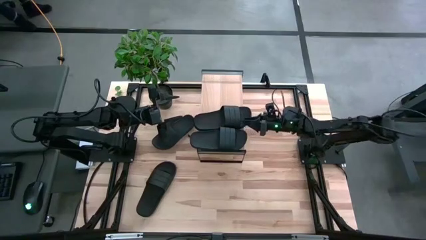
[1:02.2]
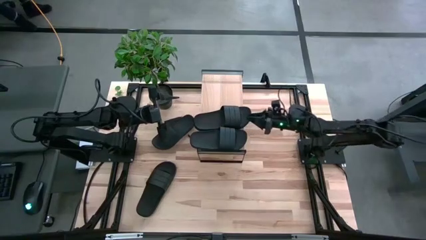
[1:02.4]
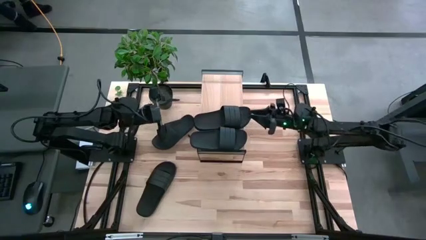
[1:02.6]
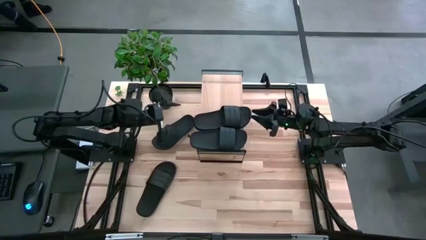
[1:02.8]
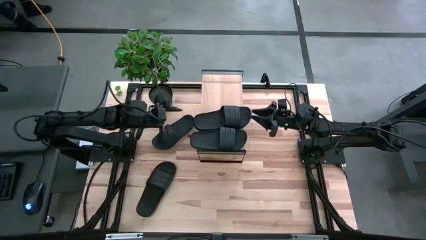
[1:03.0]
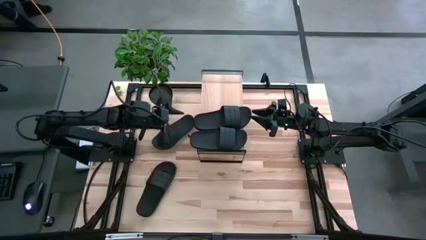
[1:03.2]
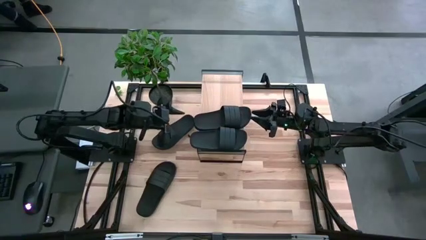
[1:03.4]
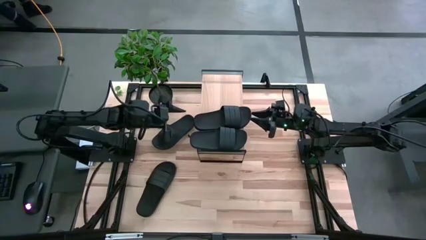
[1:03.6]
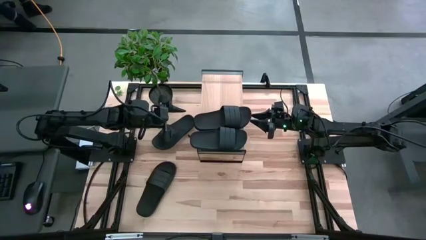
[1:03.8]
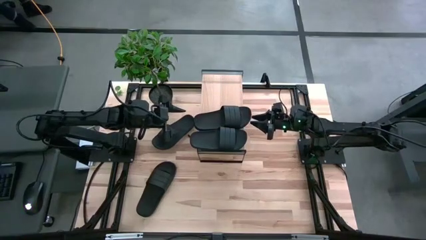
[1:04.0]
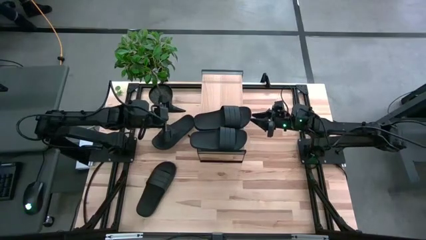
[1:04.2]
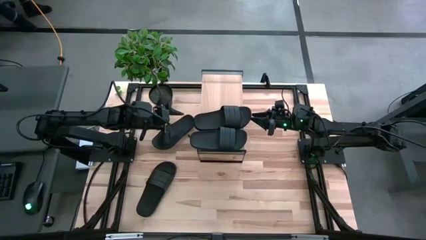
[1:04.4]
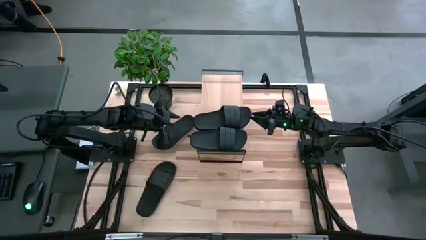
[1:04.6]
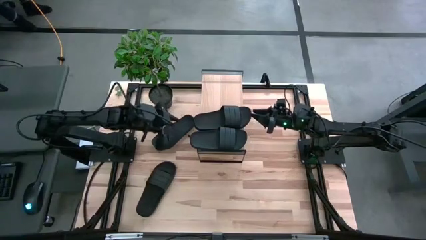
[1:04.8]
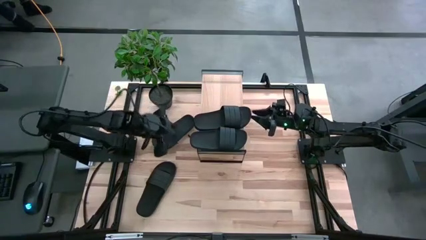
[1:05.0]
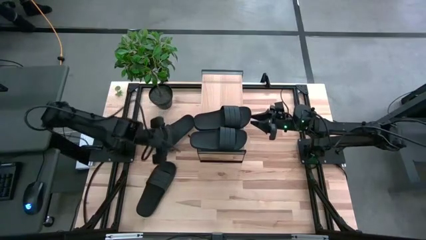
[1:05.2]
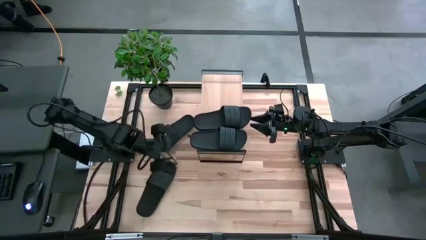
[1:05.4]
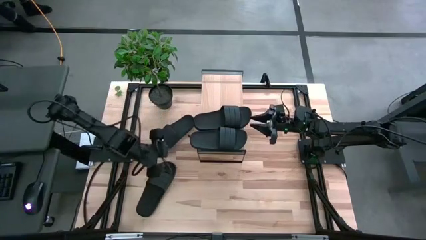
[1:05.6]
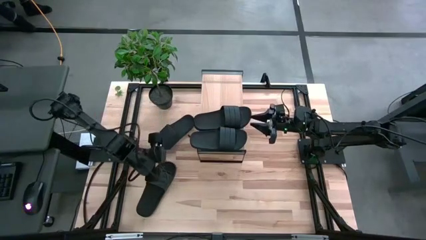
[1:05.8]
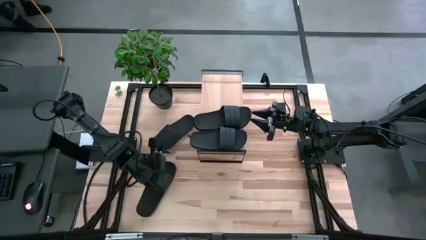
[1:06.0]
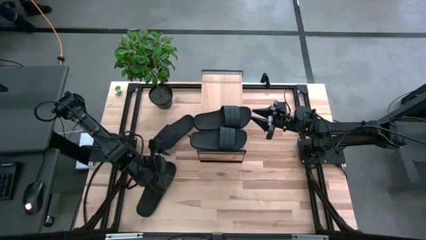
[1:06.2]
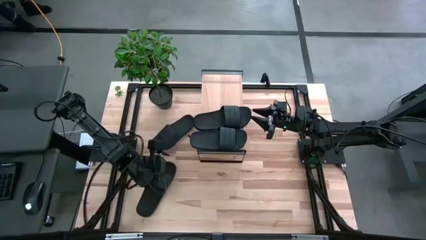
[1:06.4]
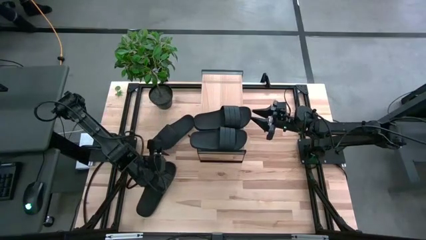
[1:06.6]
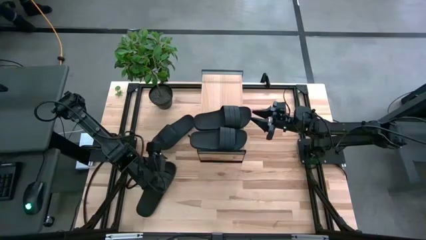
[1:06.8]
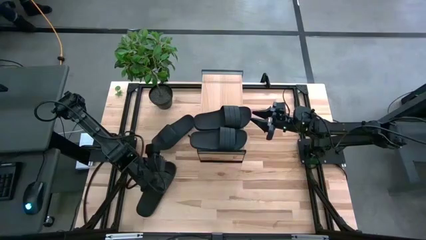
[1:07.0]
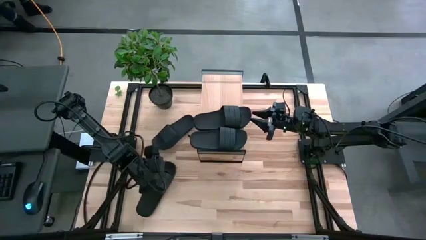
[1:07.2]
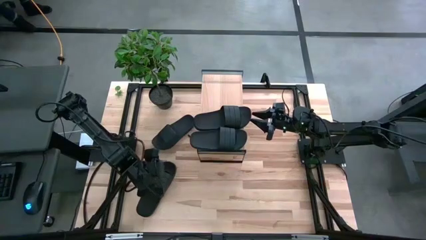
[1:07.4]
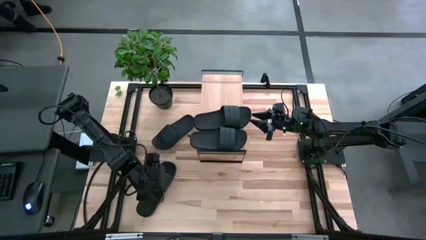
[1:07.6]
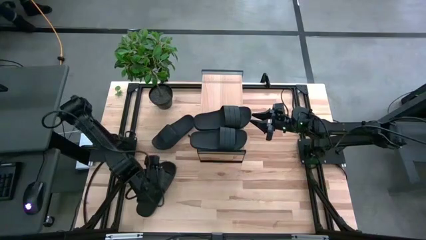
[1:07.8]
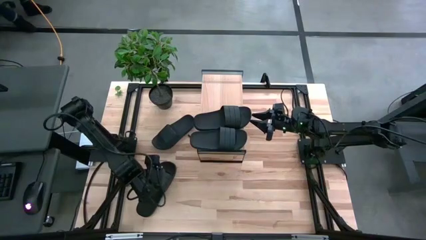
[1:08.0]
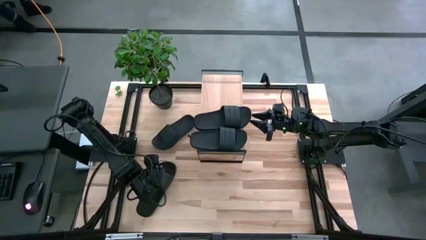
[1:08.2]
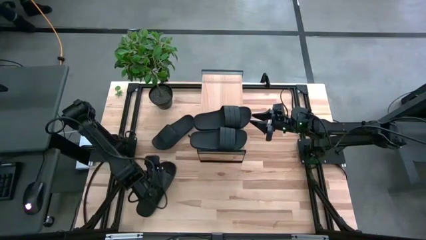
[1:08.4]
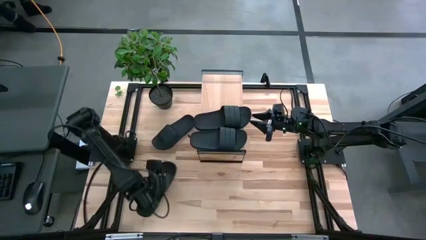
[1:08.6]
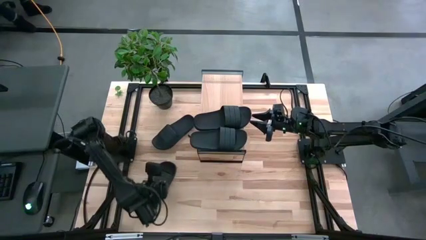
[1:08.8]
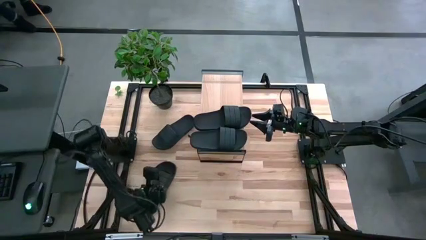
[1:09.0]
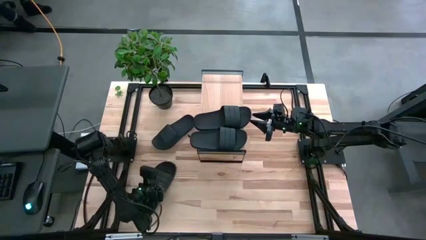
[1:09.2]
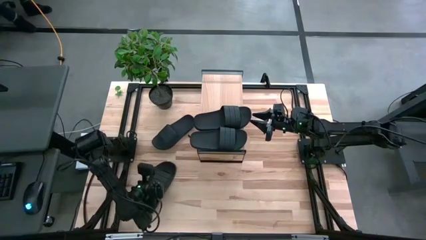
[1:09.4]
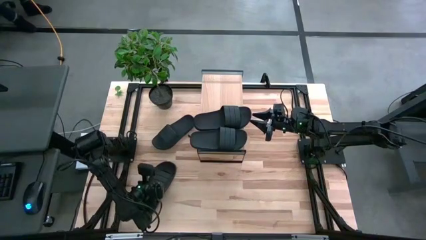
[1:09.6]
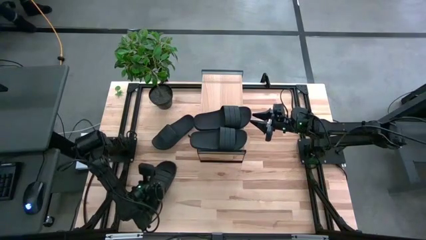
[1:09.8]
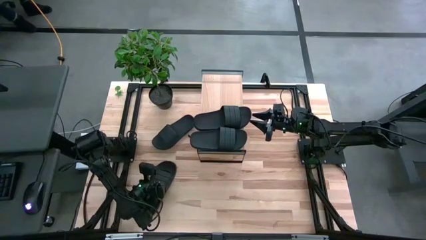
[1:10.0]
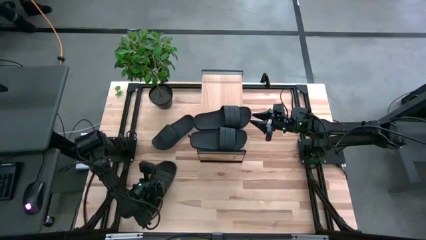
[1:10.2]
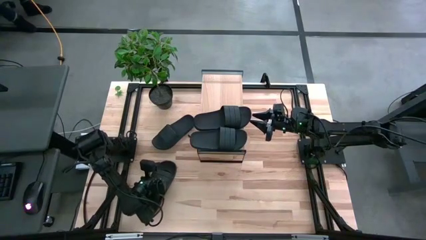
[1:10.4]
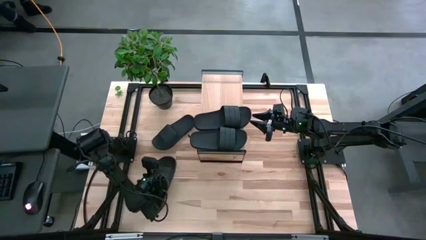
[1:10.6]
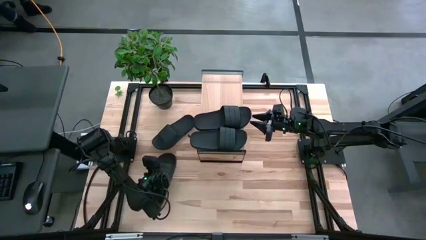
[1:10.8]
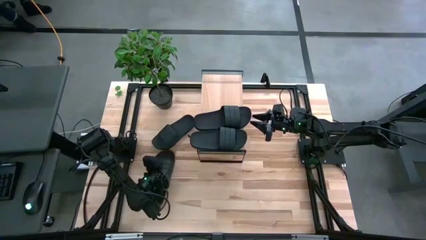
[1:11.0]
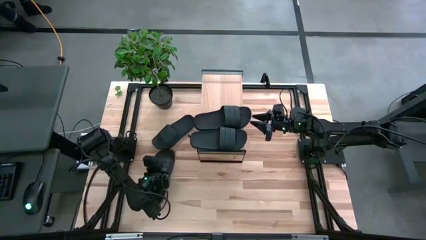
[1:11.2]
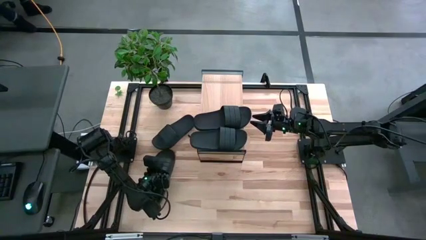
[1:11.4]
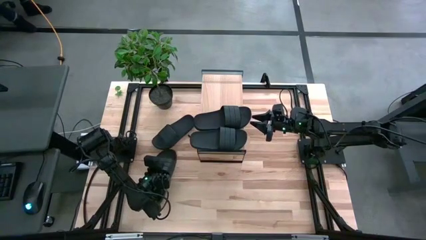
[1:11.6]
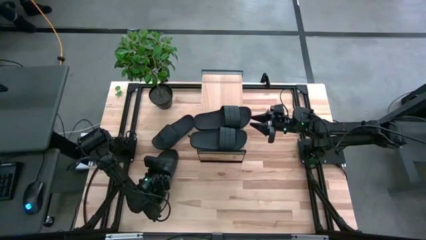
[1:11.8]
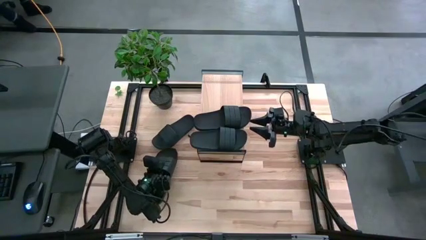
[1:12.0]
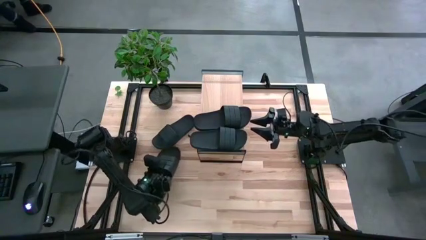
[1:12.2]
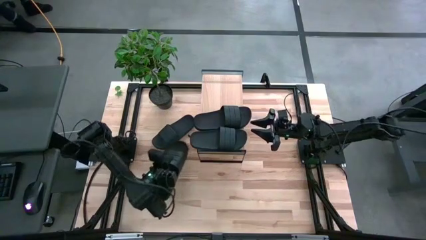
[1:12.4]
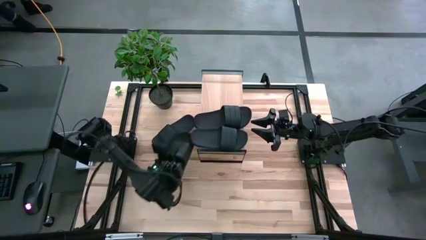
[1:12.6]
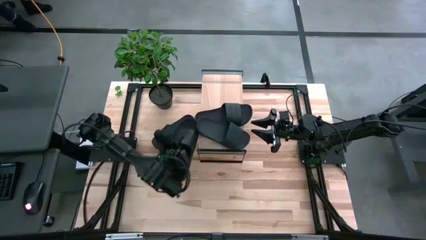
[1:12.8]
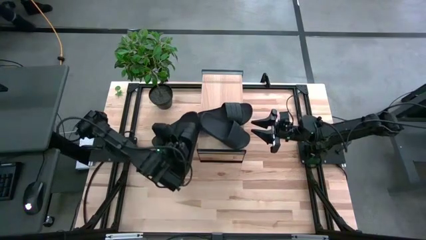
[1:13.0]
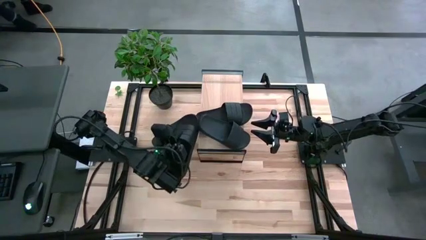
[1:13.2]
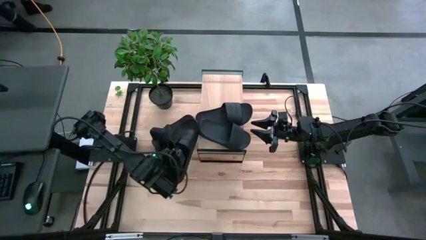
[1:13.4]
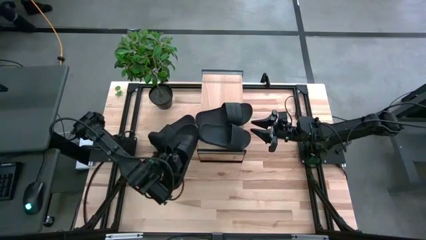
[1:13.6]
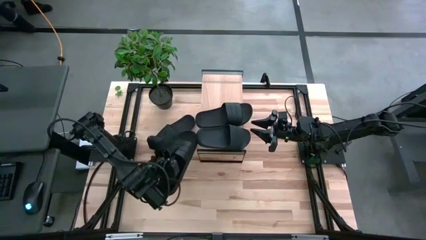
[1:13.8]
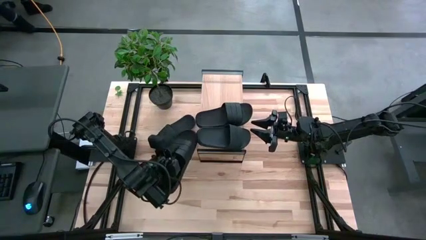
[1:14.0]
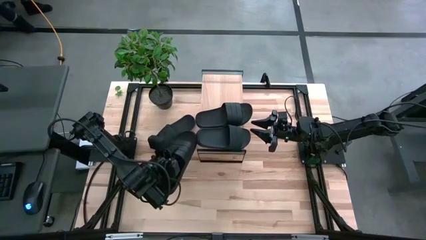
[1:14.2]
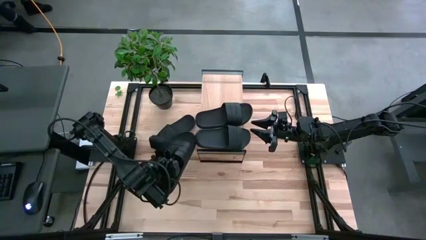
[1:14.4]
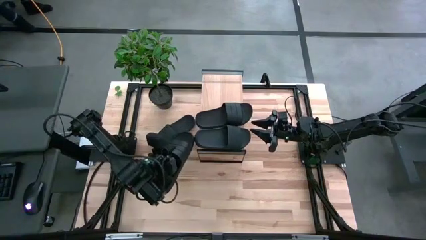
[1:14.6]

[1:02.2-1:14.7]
Task: Pick and place slides into the shelf
Put the bottom black slipper on the shelf

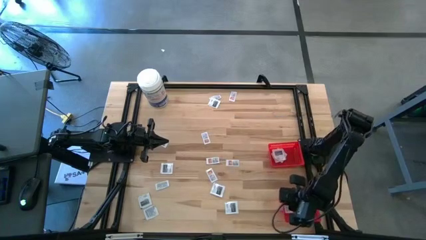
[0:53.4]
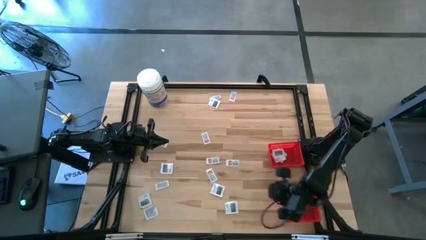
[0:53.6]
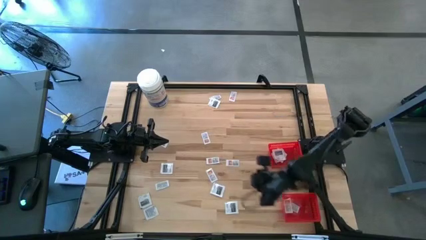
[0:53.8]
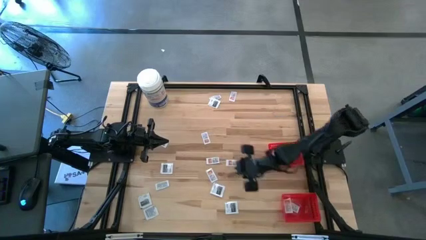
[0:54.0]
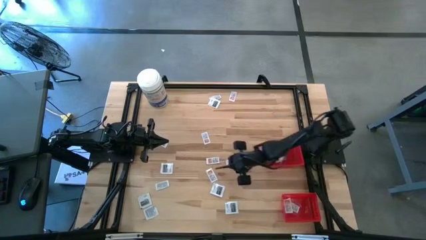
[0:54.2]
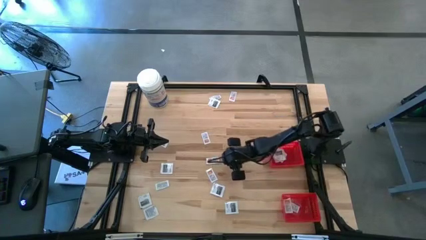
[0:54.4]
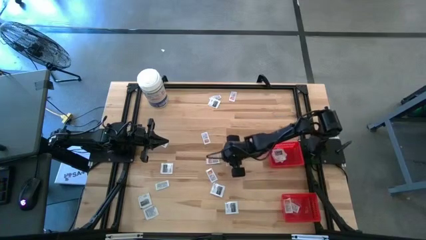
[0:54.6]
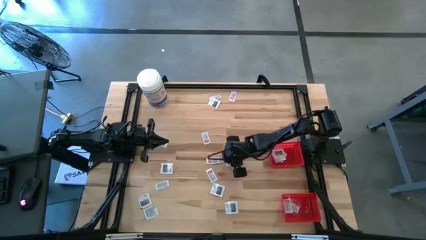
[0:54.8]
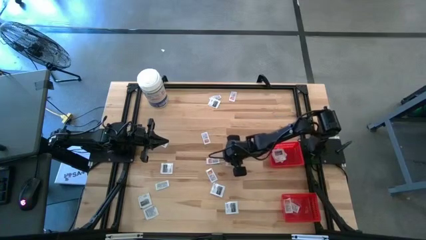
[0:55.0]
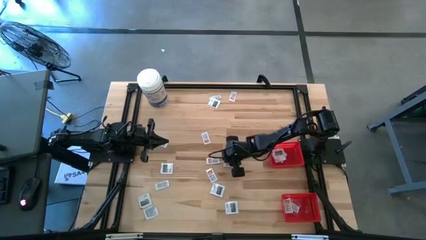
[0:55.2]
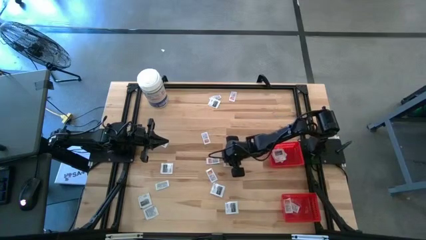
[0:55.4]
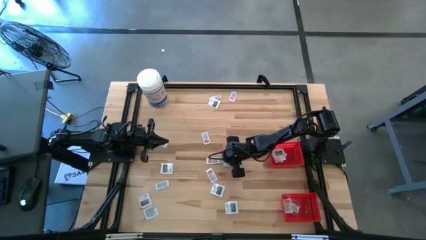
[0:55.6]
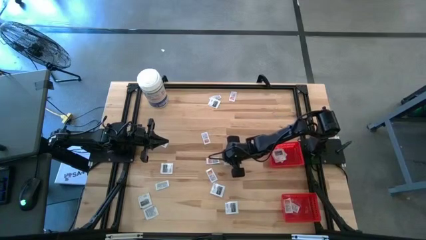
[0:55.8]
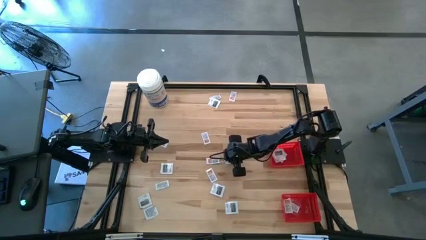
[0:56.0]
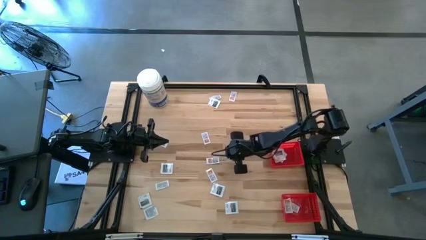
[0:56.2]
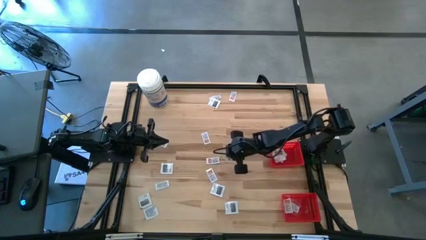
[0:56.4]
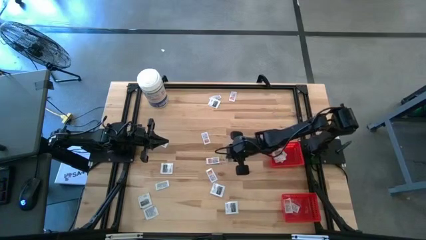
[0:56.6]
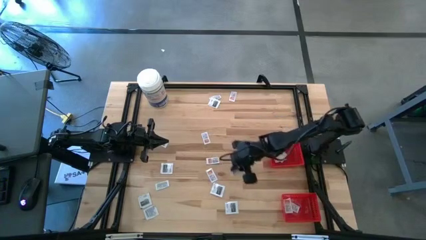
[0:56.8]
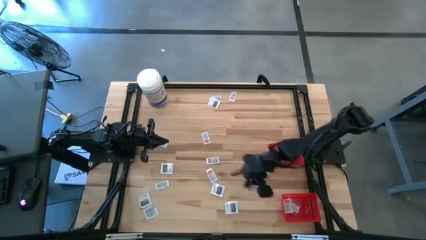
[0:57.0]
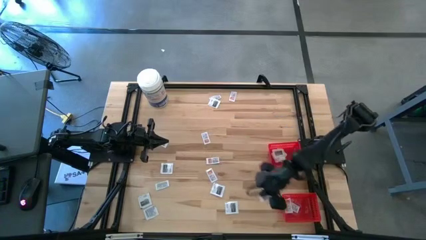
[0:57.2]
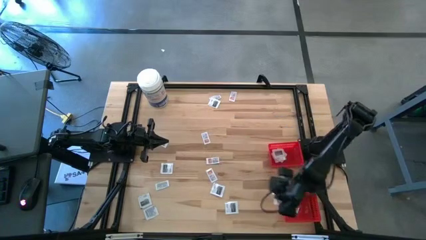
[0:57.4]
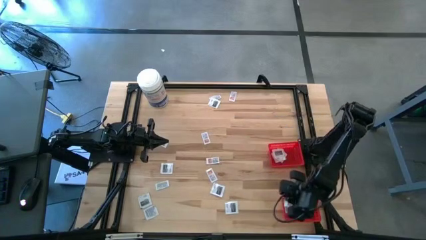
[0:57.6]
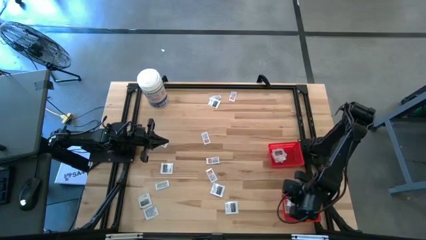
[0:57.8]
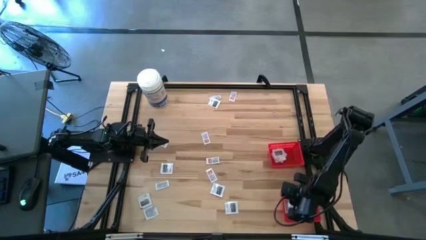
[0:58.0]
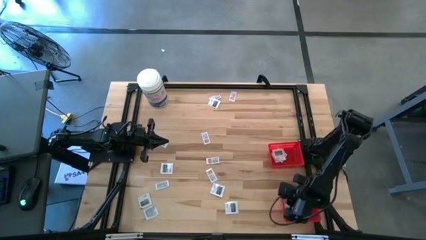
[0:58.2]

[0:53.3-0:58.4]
Task: Pick & Place First Aid Supplies
Put the orange ointment pack into the bottom red basket
